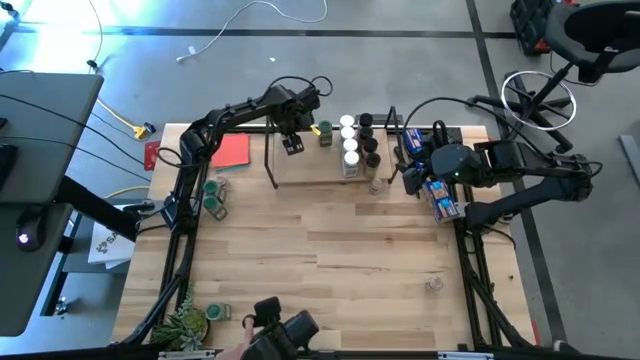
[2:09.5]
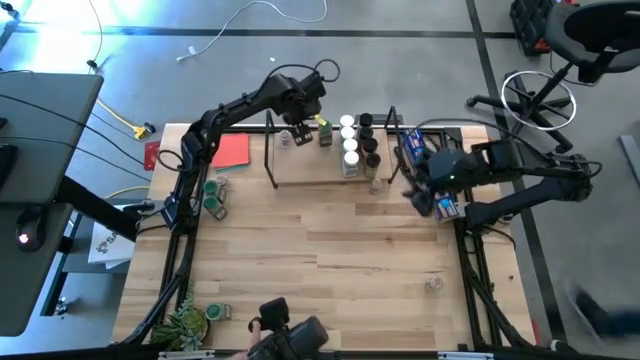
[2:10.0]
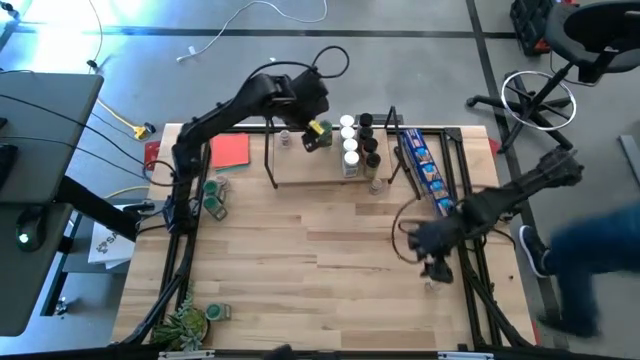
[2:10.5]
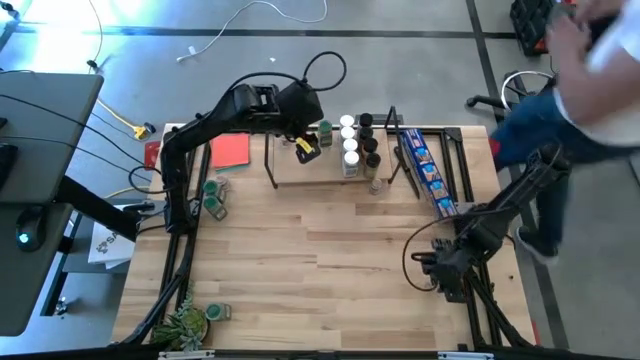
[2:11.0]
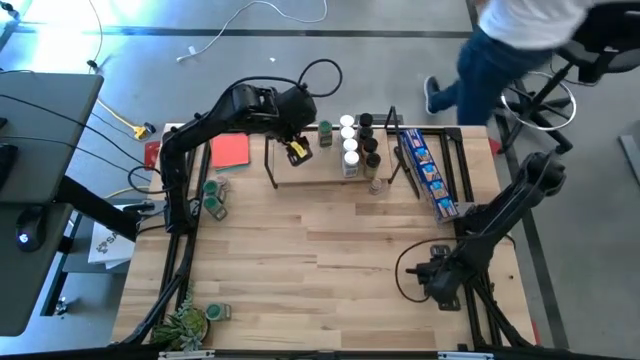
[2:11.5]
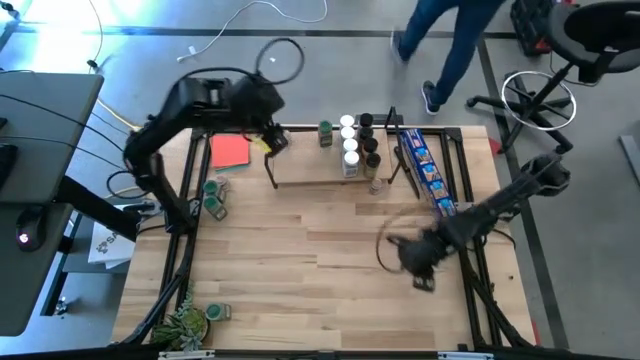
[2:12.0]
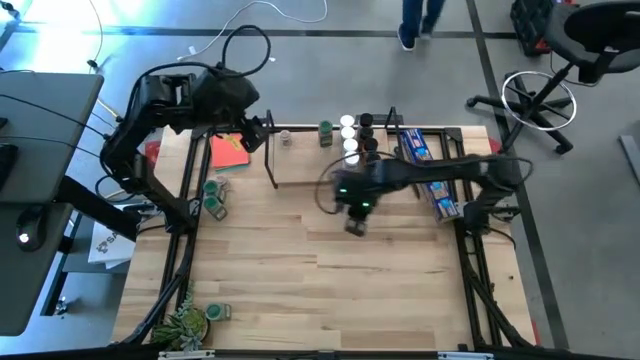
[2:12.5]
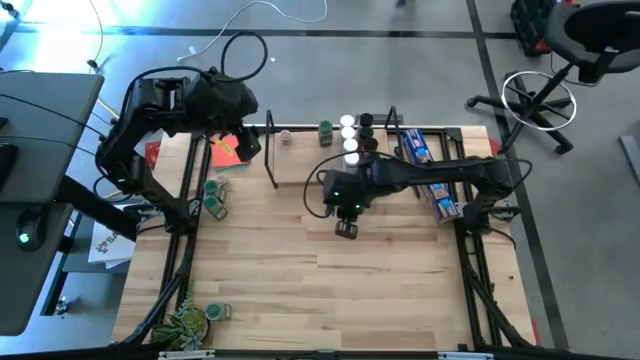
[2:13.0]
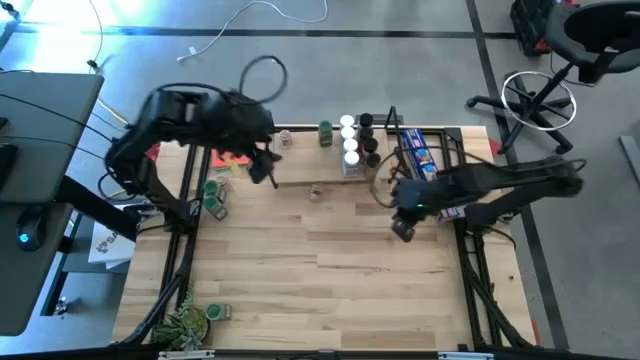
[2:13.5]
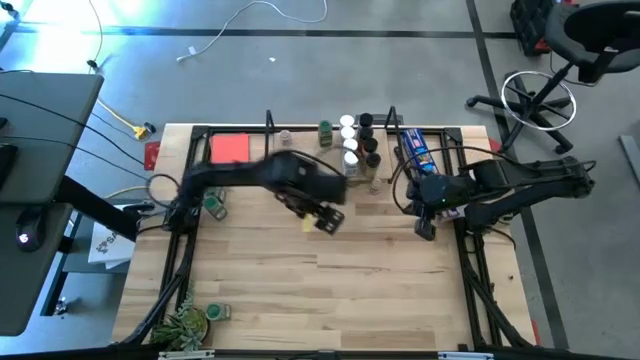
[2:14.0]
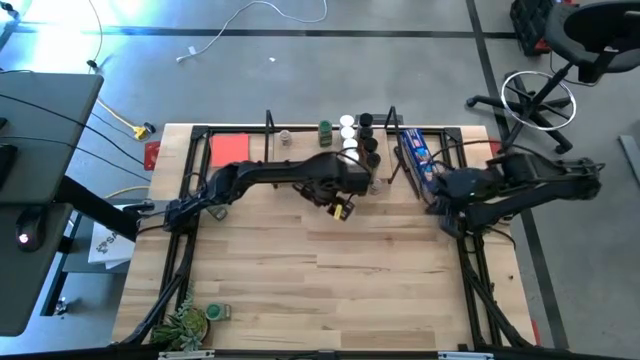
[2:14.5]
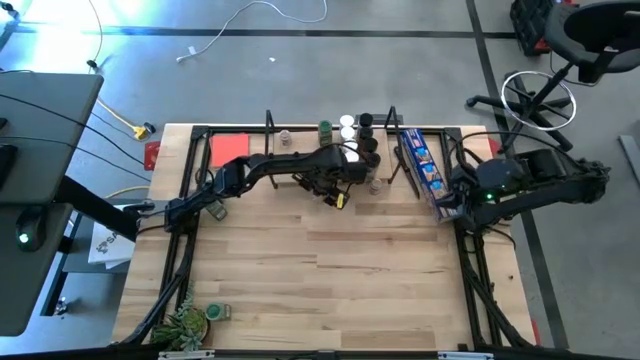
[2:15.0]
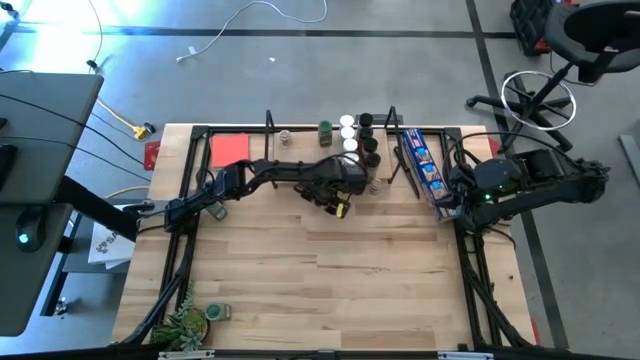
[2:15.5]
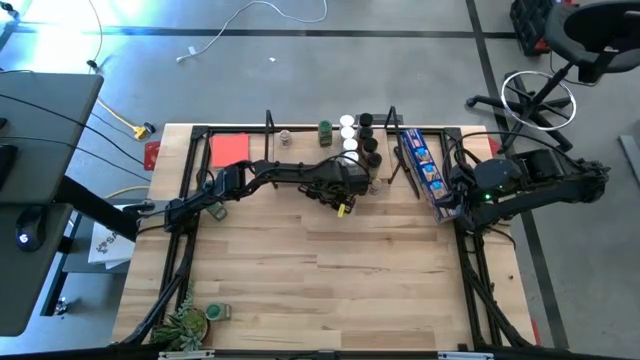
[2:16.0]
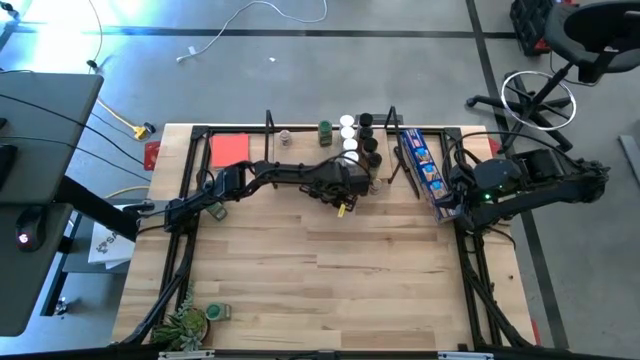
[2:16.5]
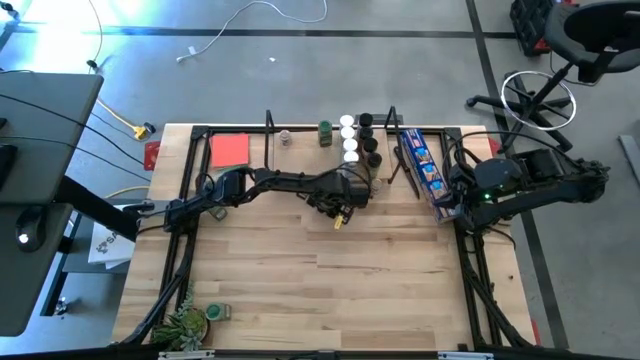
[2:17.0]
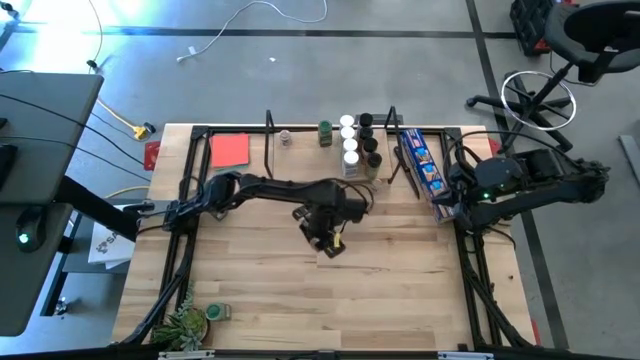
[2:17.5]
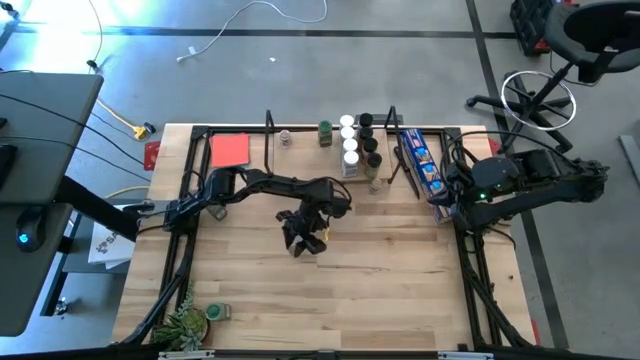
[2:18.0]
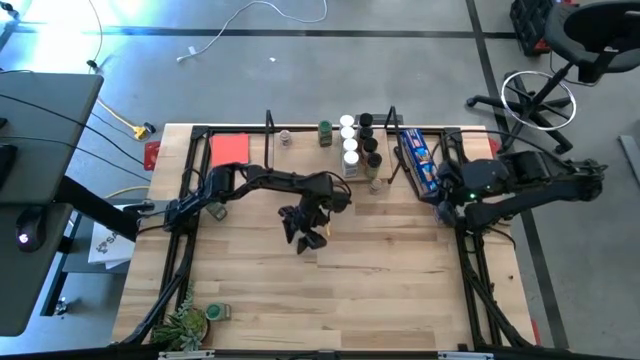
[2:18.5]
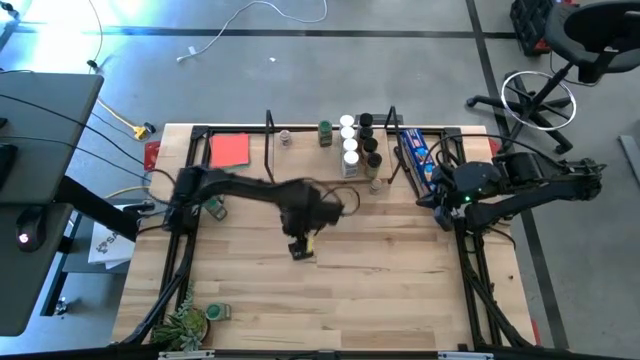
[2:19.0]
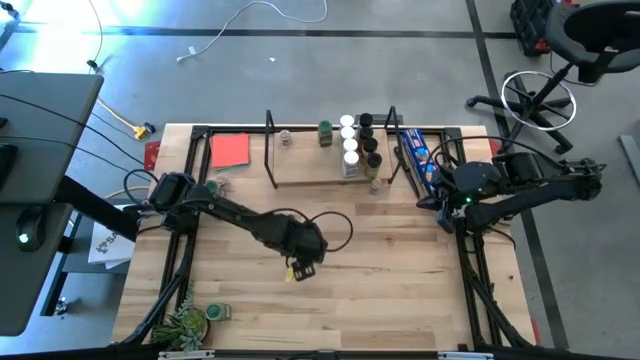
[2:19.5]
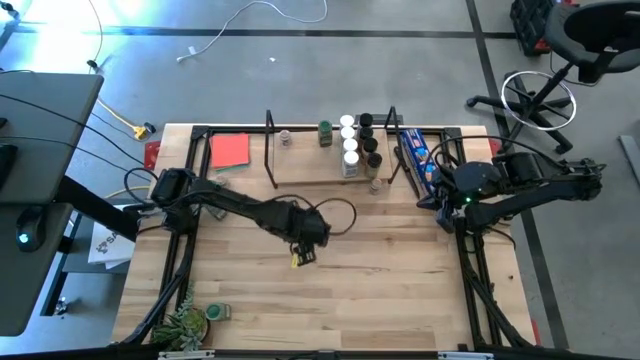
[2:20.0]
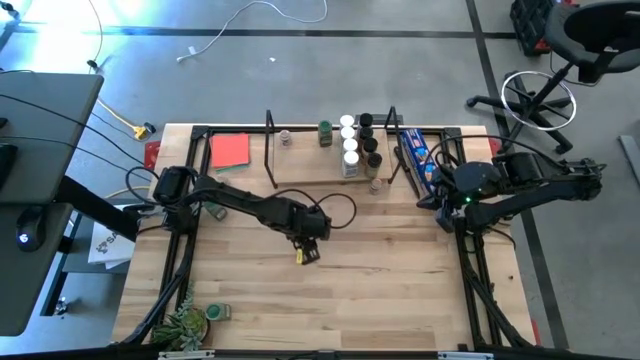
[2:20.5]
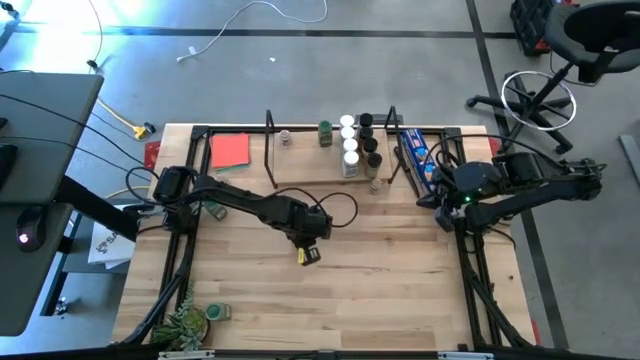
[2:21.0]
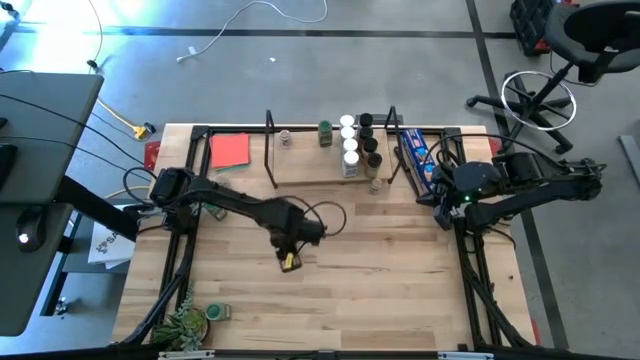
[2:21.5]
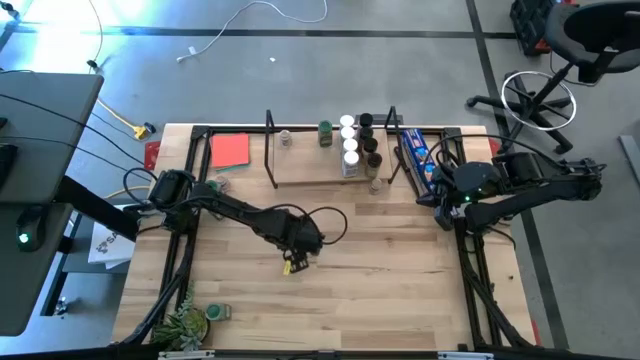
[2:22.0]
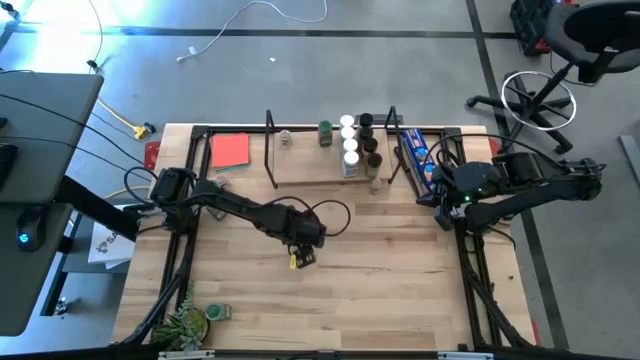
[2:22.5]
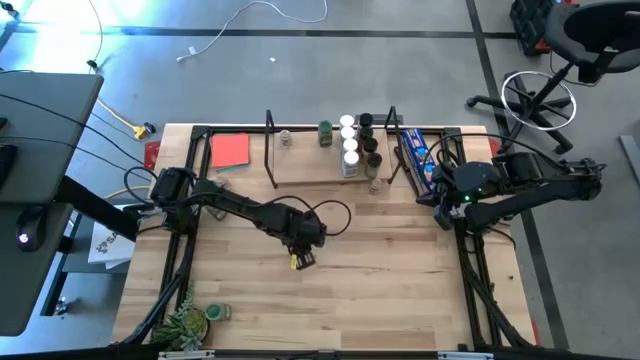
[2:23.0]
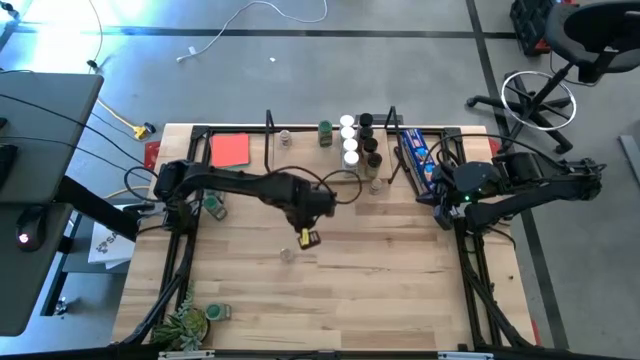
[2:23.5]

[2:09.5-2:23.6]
Task: Shelf spices
Put the bottom right brown bottle on the shelf aligned with the other brown seasoning bottle

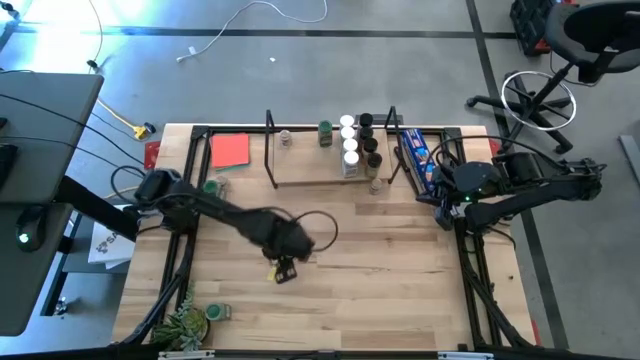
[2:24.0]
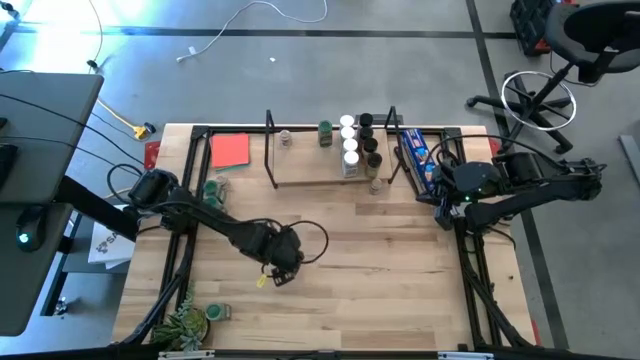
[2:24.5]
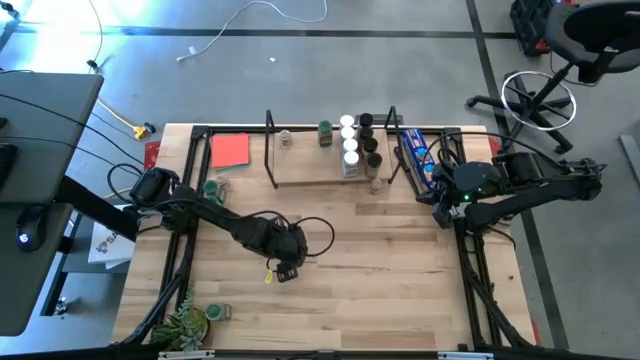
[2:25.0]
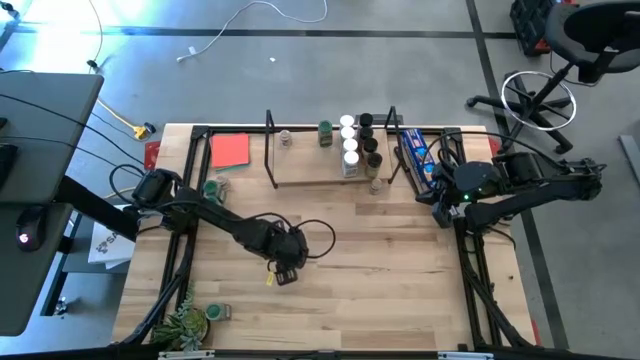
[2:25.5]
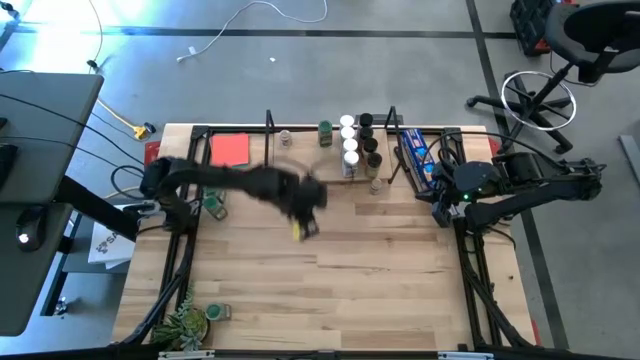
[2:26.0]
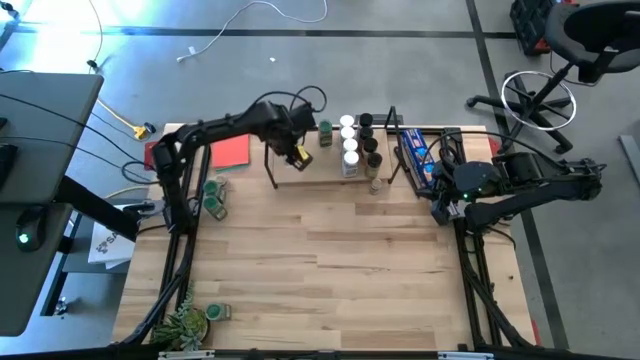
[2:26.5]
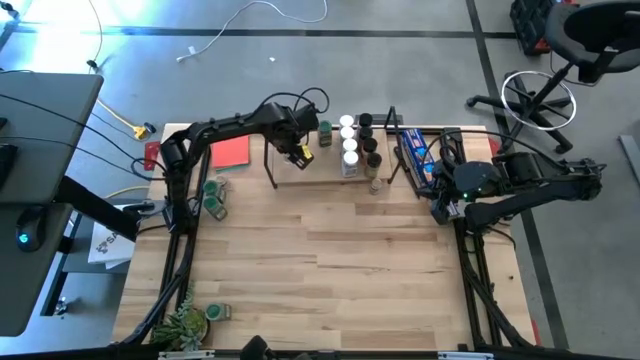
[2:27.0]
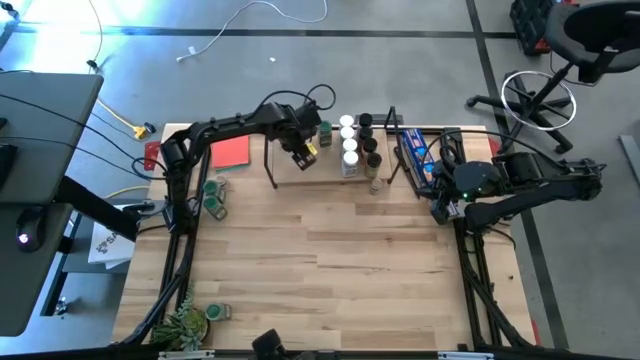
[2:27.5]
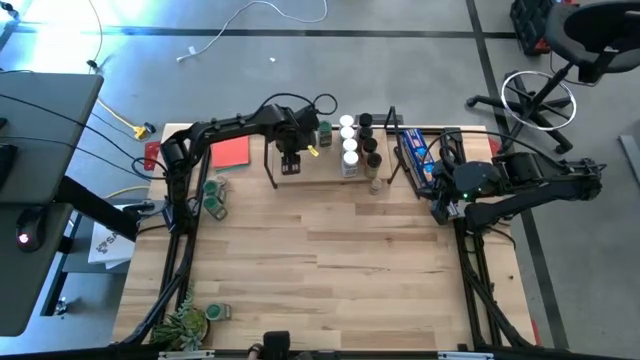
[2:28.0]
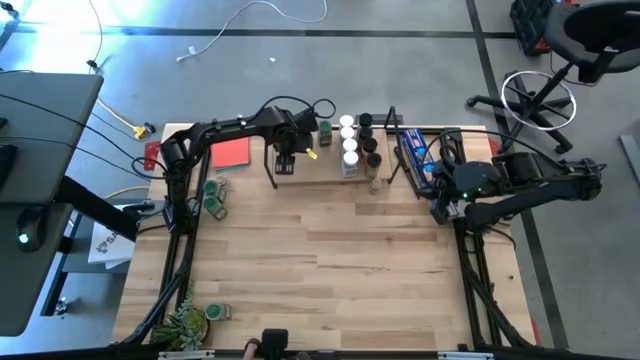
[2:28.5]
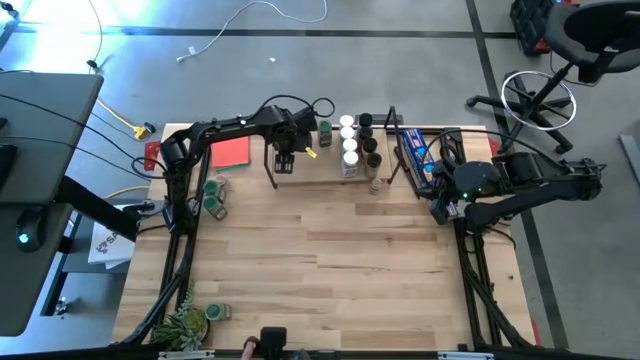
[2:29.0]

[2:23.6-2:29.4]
Put the bottom center brown bottle on the shelf aligned with the other brown seasoning bottle

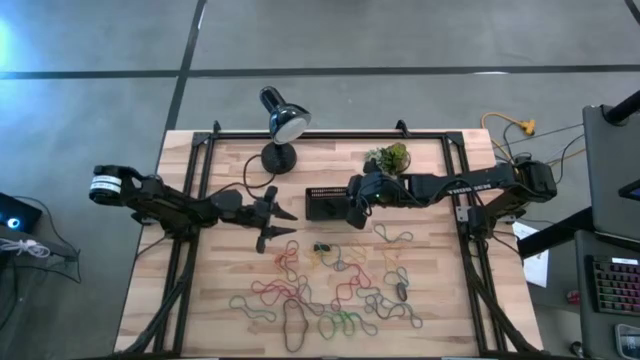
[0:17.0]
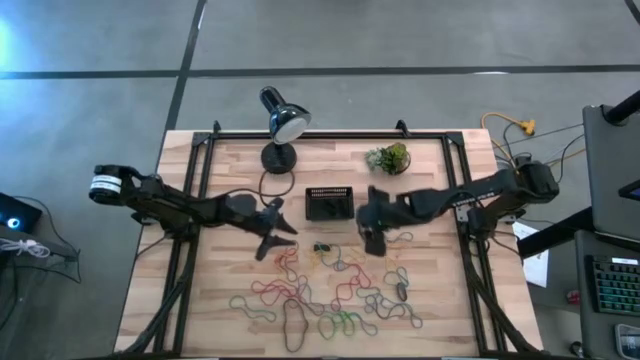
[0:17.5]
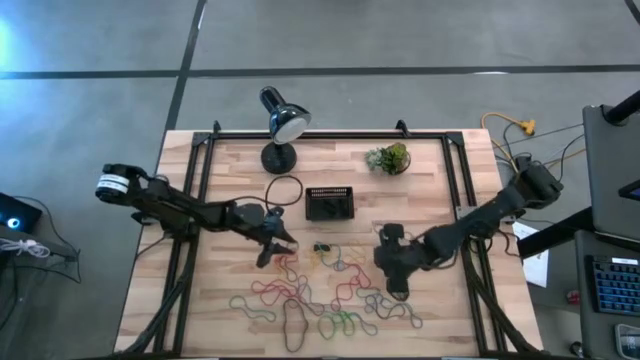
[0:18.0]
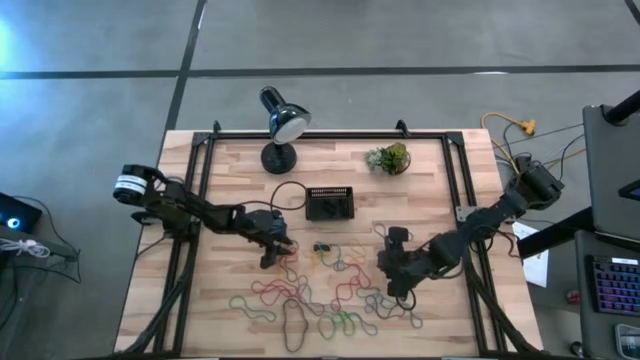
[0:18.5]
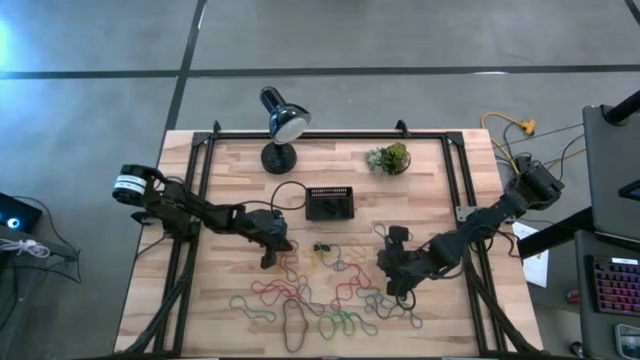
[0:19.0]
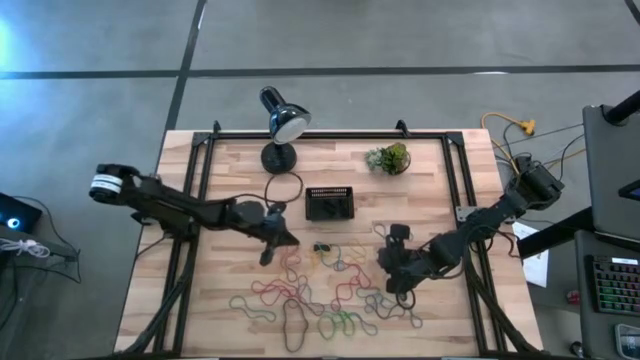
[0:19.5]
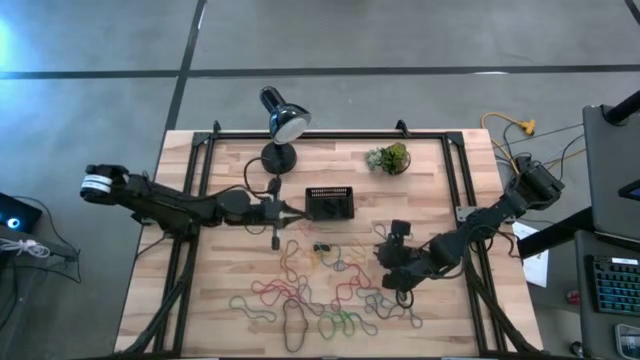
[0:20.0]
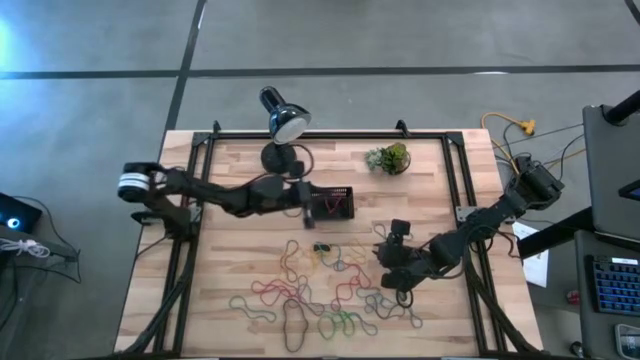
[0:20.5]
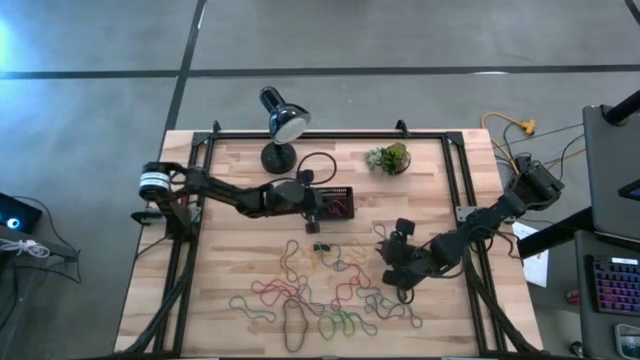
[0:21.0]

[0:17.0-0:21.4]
Task: Pick and place rubber bands into bin
Put the red rubber band into the black bin
